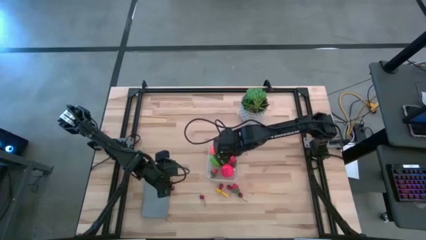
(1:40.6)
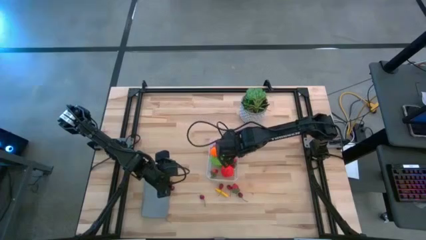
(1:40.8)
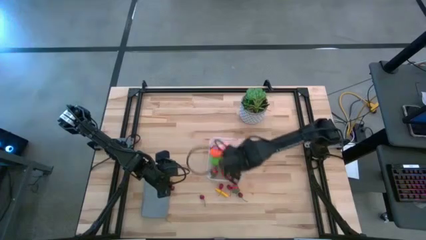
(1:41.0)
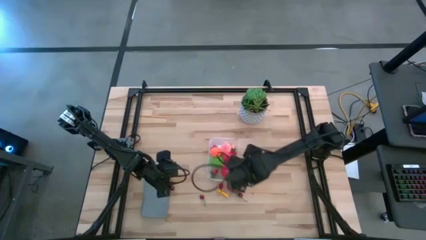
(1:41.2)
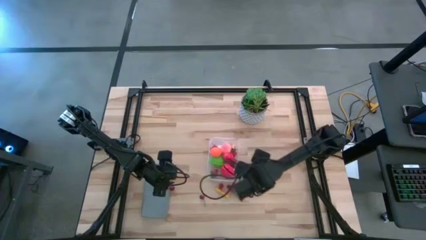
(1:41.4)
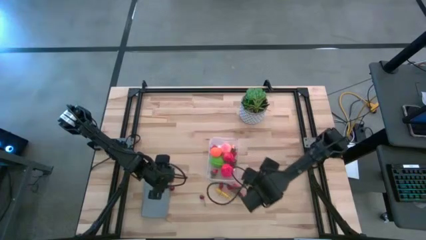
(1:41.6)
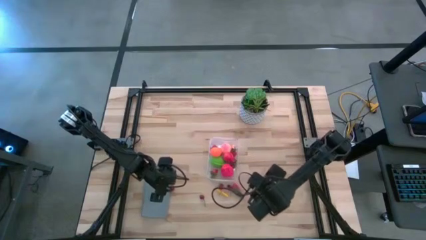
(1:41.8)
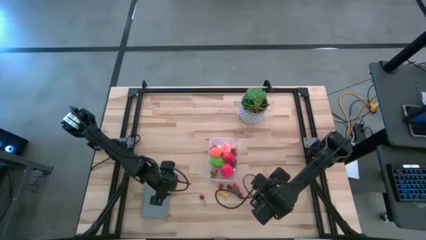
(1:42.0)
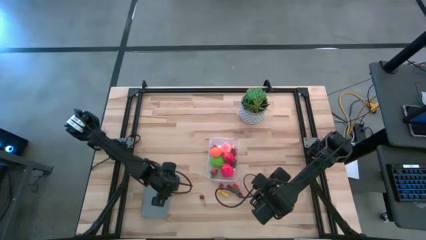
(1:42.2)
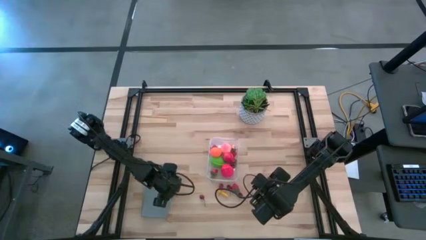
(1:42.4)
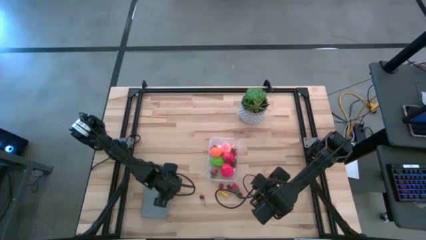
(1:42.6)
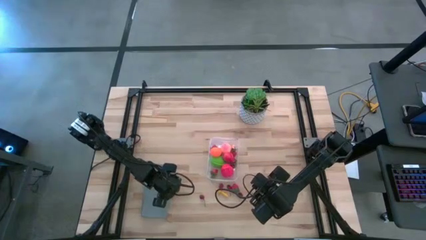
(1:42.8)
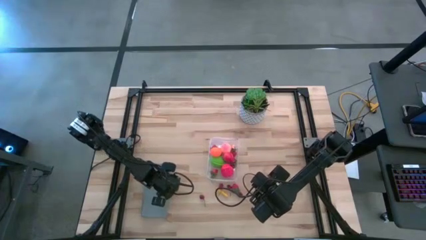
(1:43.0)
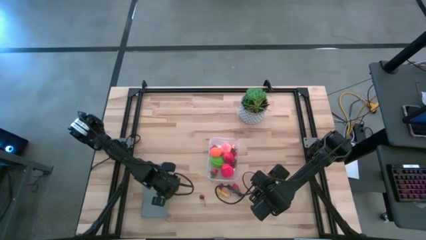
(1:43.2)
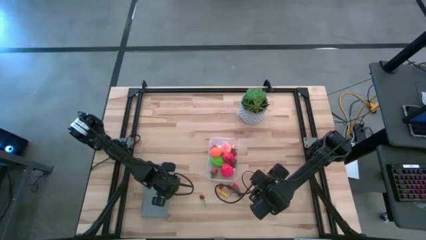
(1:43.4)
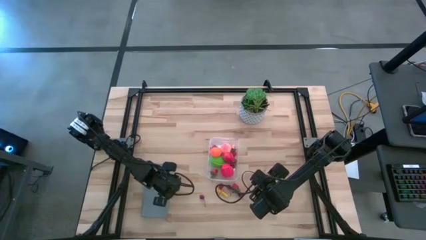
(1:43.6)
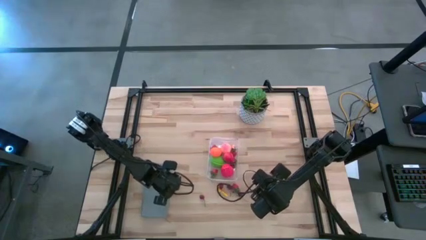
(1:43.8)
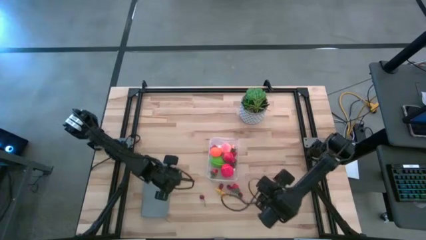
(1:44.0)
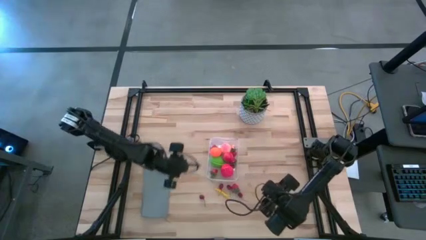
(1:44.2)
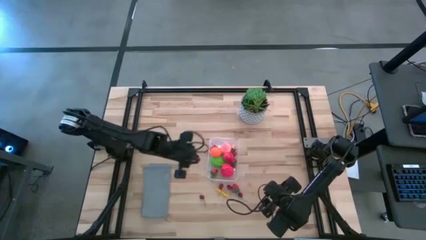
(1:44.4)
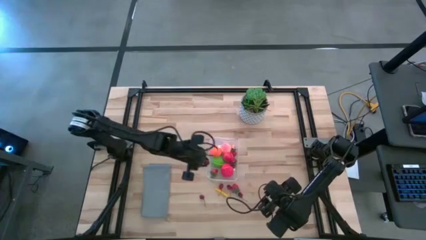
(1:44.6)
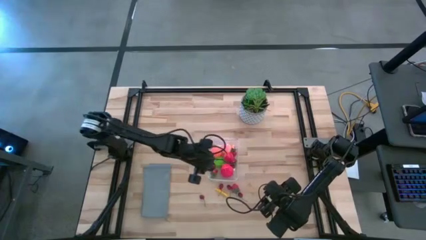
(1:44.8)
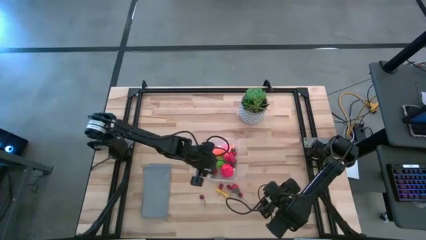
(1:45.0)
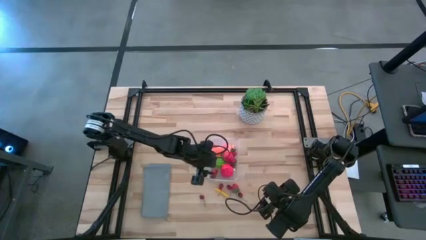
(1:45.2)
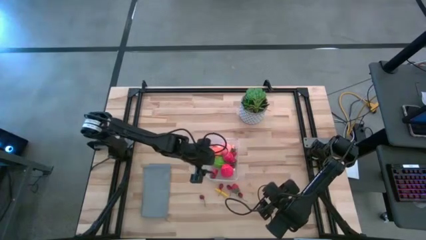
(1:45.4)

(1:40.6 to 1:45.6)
Task: Pick and placing Produce into tupperware
Put the red cherry into the transparent bin

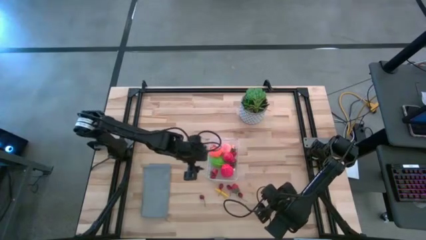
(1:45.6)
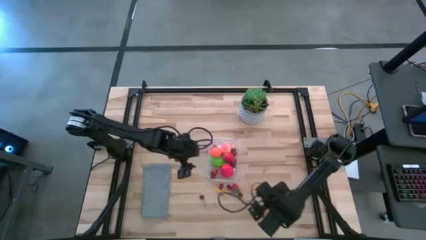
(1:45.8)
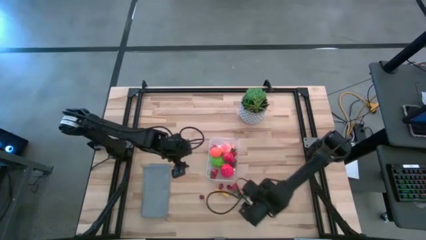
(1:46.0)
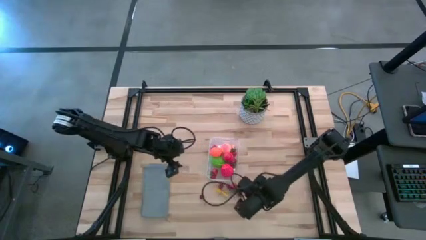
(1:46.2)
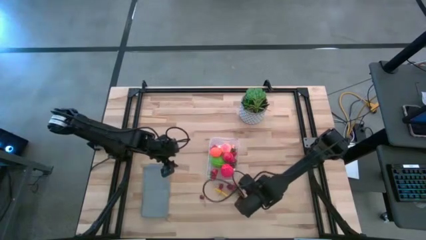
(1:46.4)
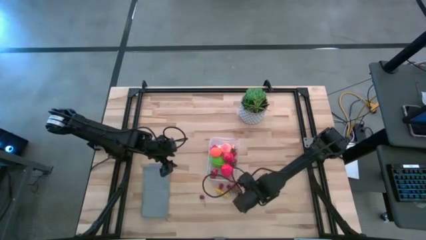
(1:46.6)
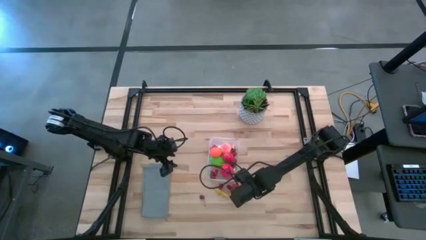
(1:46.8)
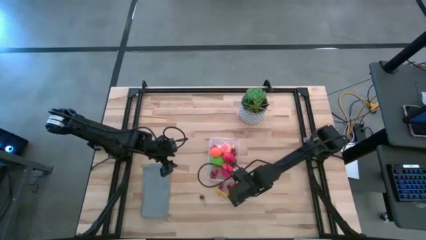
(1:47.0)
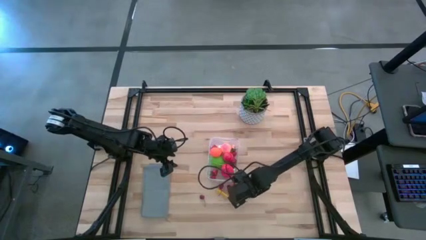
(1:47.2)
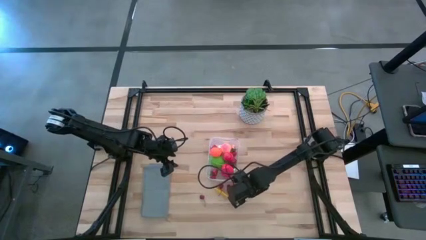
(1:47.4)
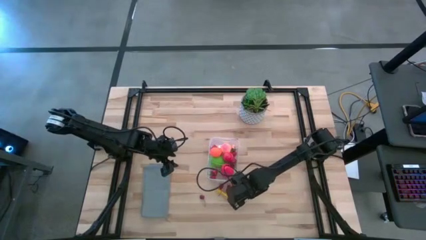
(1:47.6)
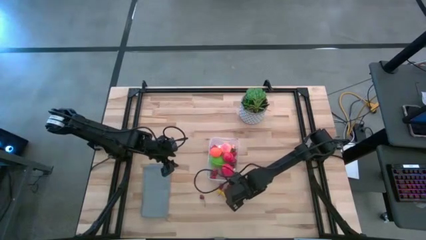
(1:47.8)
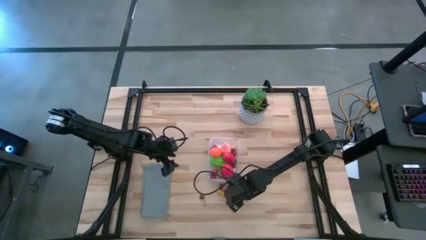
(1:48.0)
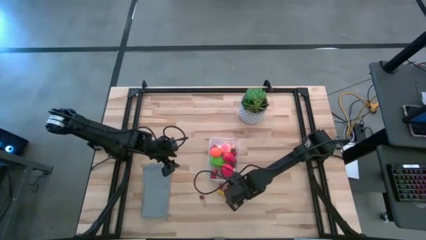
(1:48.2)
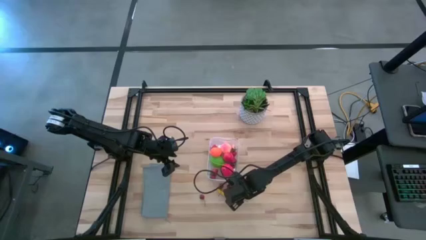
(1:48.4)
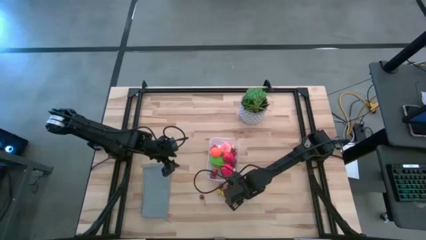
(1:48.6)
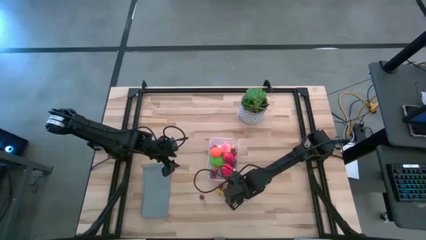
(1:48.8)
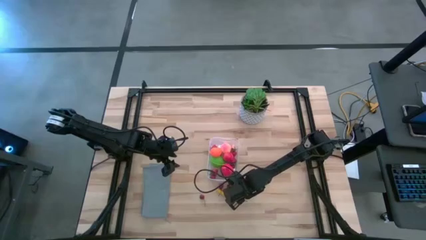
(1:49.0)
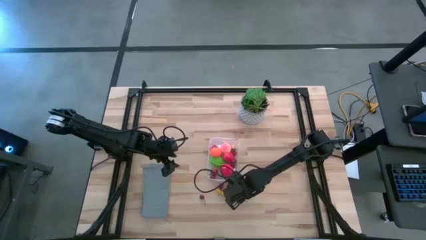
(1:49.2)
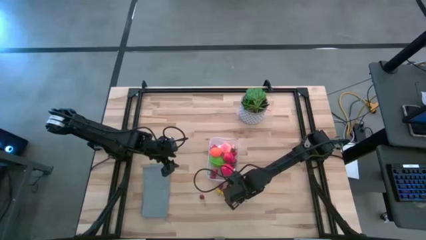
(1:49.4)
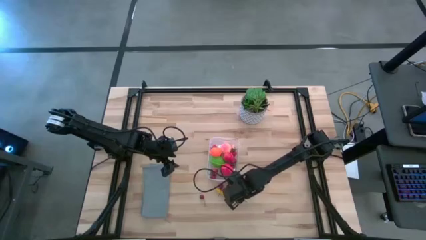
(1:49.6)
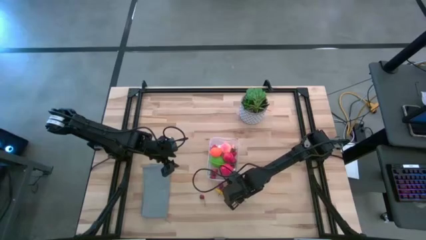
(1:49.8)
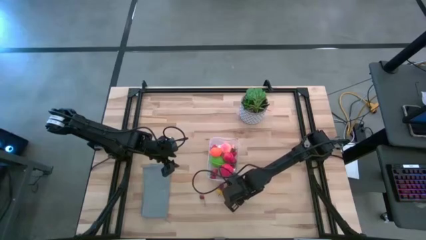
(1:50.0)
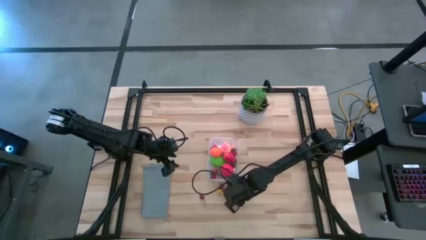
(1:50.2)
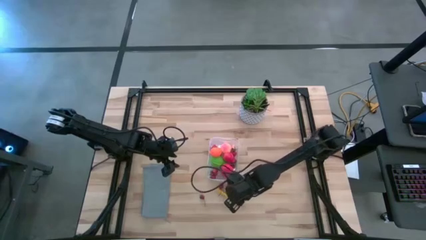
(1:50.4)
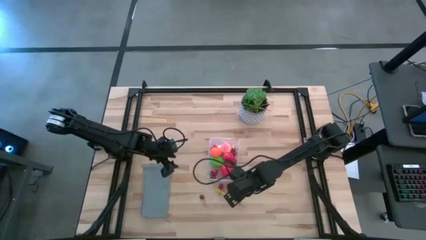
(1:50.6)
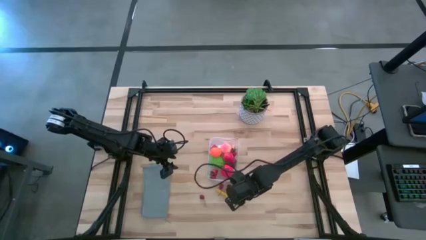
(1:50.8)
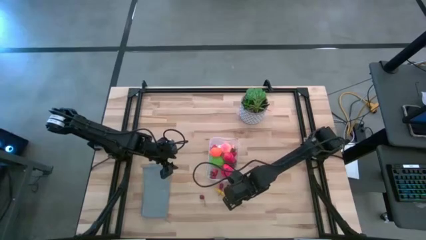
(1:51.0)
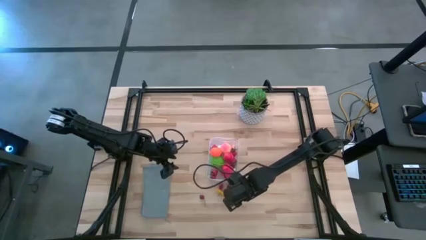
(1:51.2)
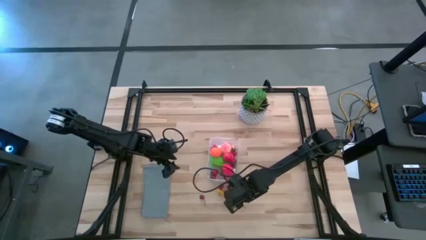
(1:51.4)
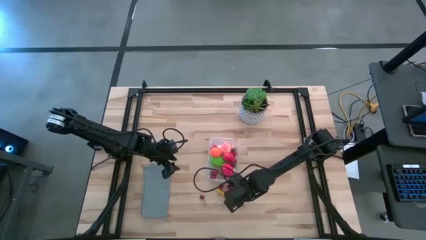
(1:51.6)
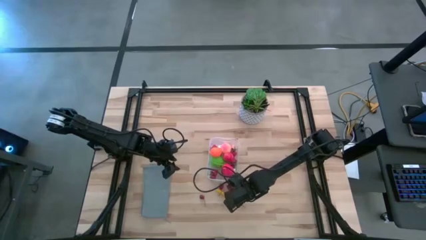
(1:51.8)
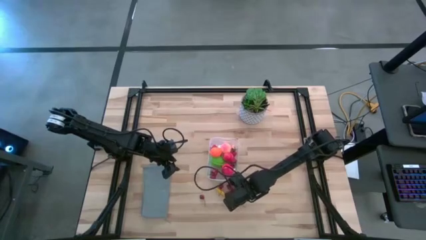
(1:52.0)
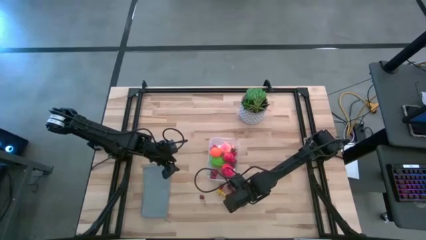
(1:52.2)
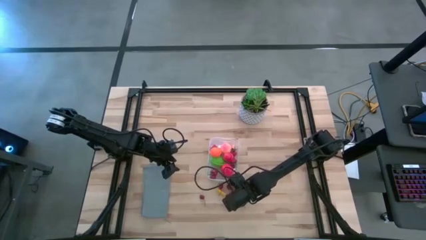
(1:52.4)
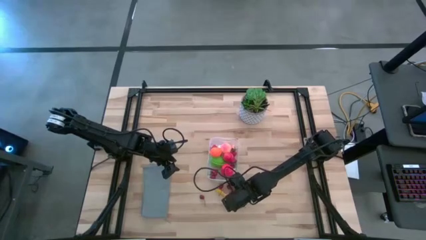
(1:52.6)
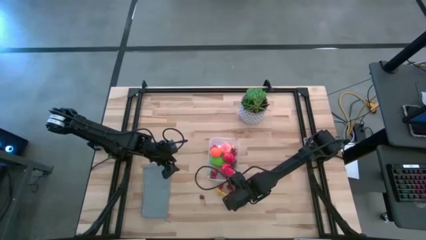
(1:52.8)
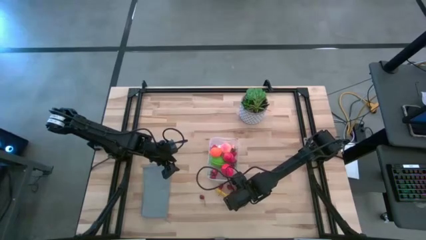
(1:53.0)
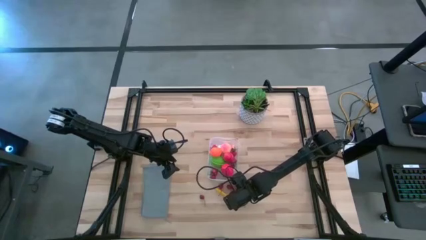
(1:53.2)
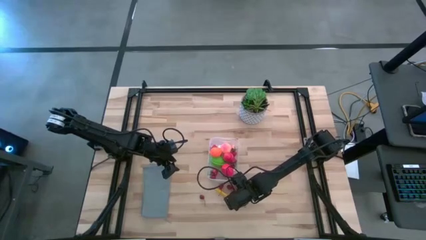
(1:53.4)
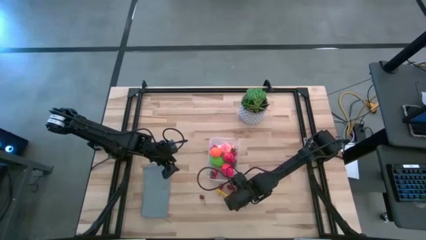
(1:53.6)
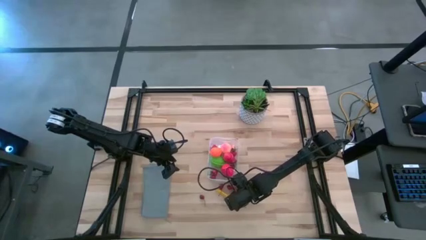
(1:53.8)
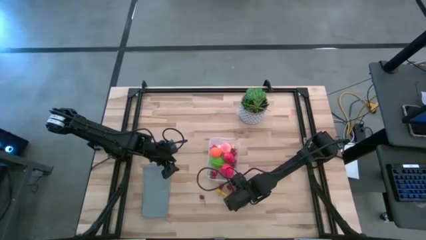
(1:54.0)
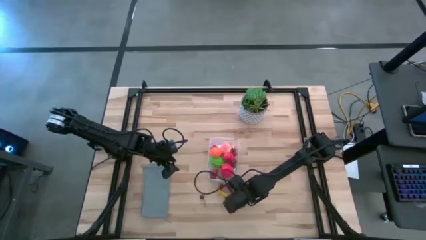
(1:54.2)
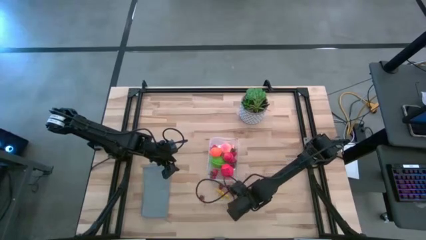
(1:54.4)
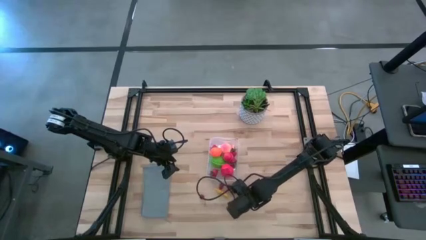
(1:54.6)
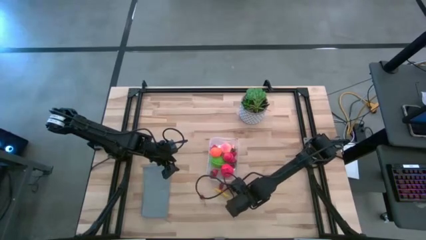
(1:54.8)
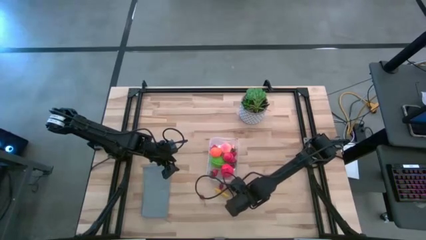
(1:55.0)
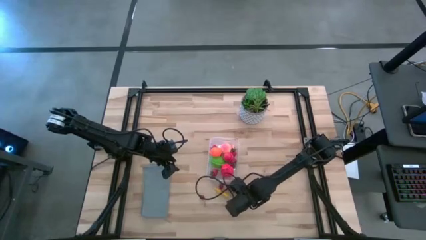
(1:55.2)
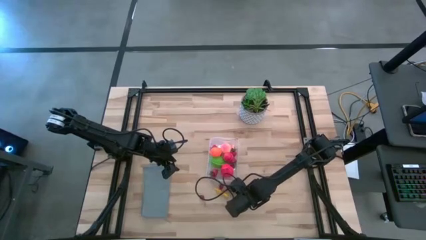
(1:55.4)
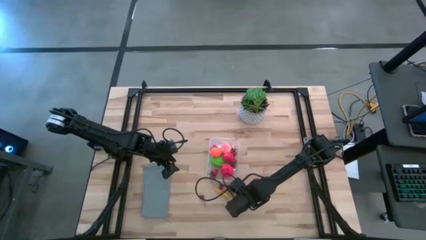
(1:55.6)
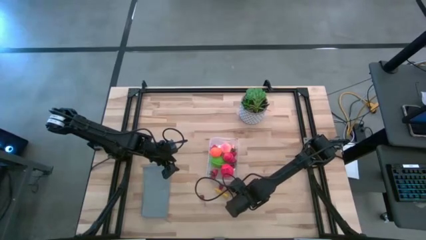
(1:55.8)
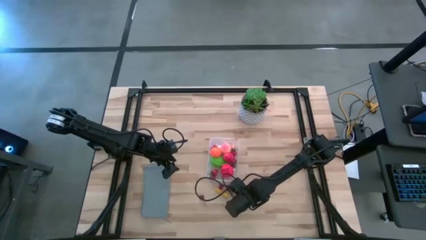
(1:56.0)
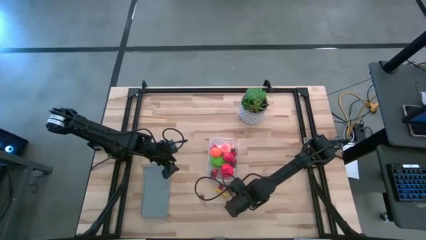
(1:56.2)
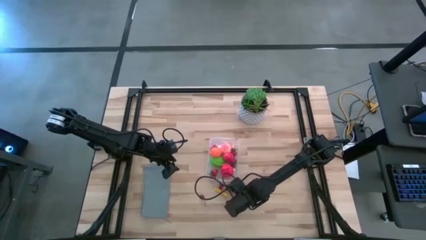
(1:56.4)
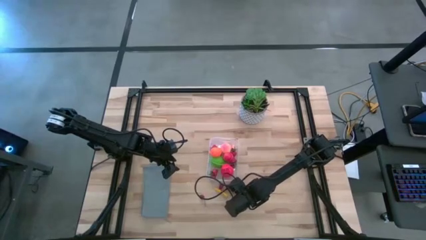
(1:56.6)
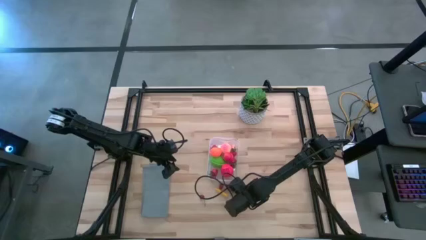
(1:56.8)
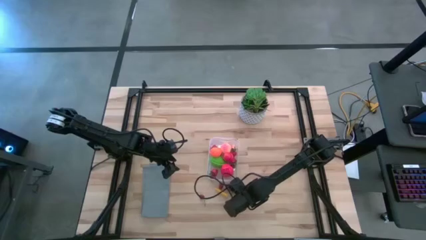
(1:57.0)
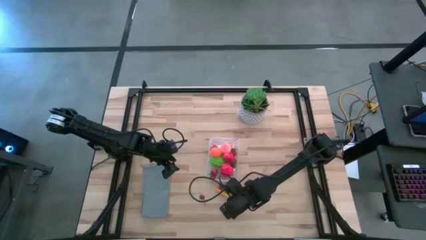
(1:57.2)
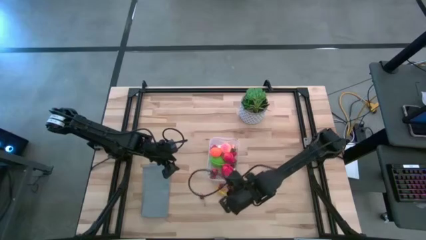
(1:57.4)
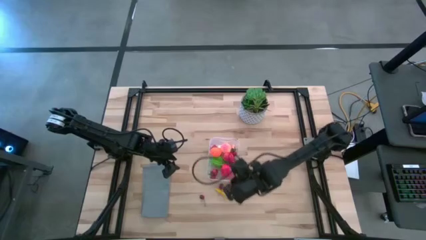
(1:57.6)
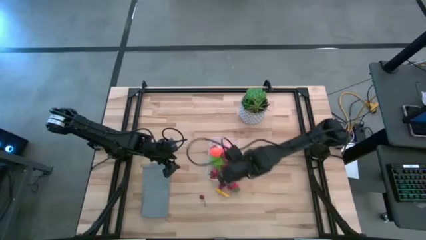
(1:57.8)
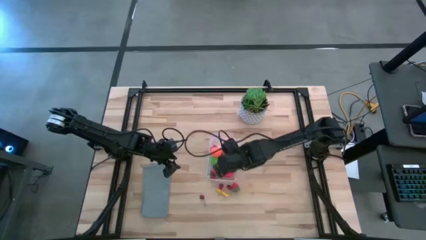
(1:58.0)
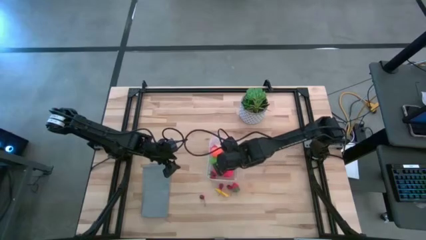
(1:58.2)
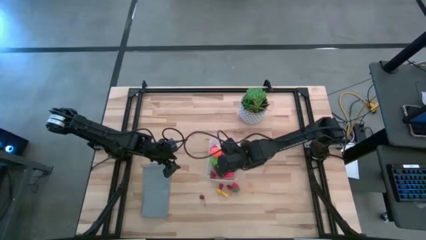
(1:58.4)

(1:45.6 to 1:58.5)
Put the red cherry into the transparent bin
